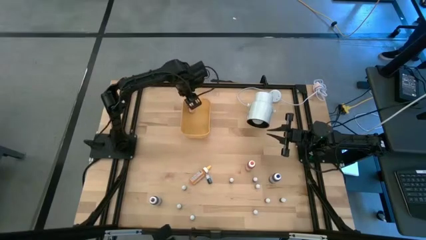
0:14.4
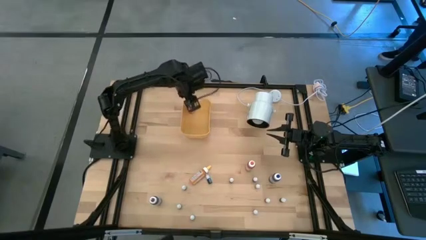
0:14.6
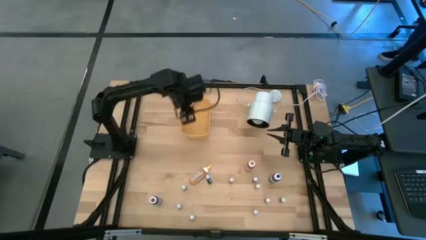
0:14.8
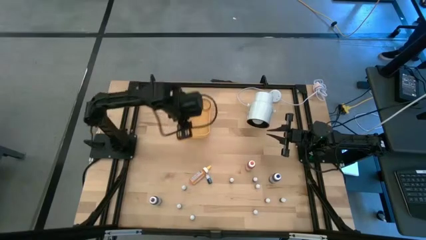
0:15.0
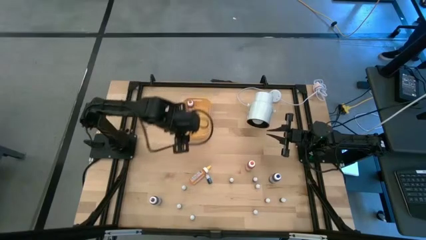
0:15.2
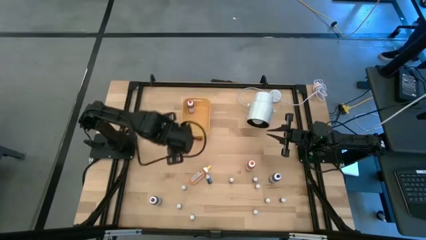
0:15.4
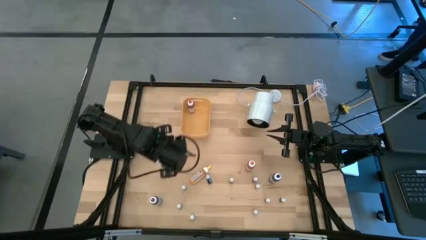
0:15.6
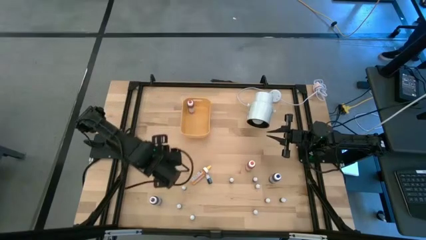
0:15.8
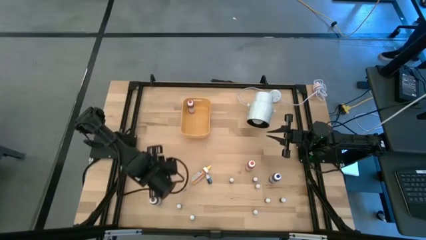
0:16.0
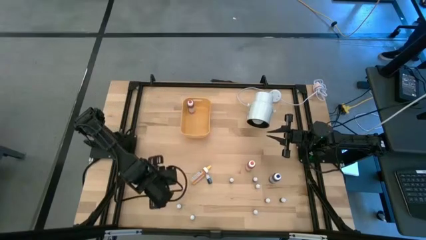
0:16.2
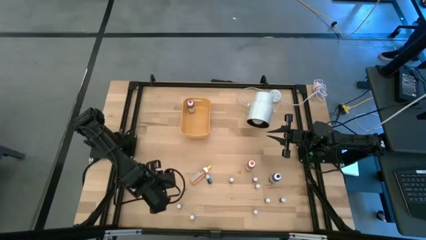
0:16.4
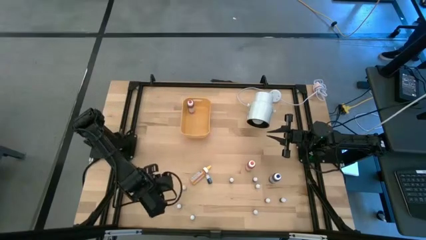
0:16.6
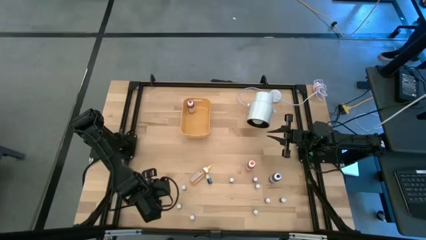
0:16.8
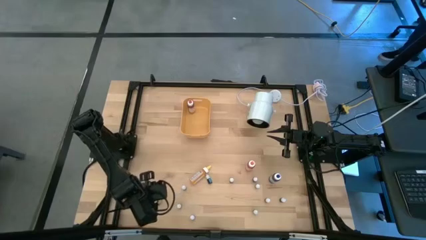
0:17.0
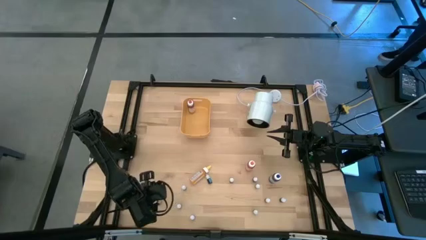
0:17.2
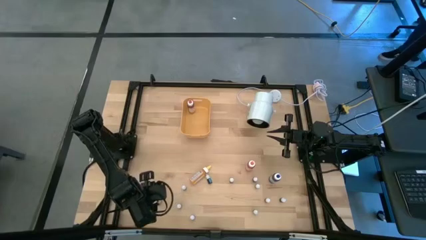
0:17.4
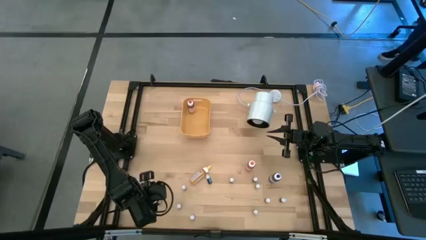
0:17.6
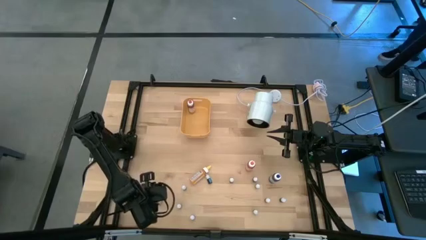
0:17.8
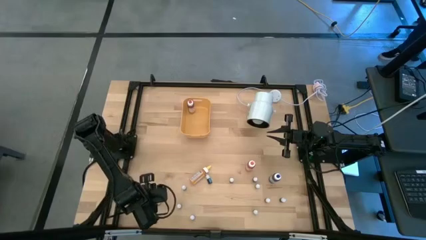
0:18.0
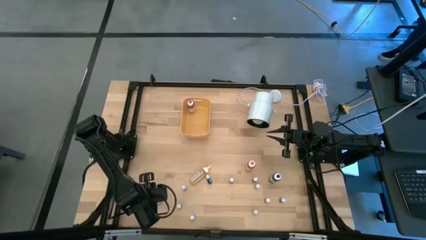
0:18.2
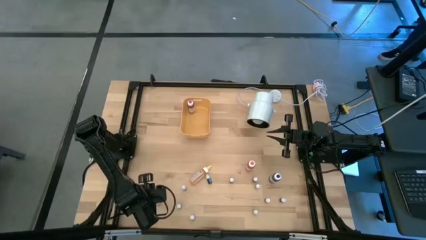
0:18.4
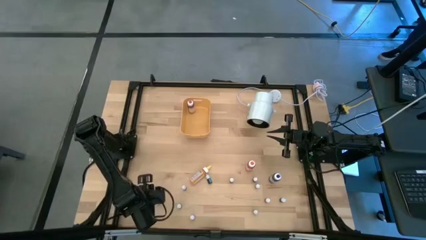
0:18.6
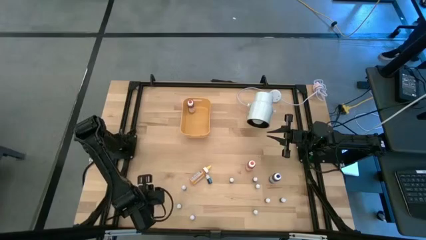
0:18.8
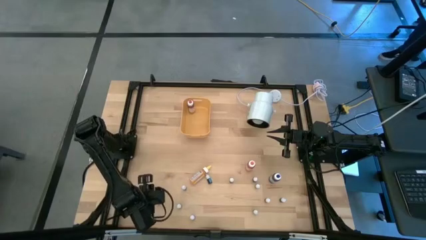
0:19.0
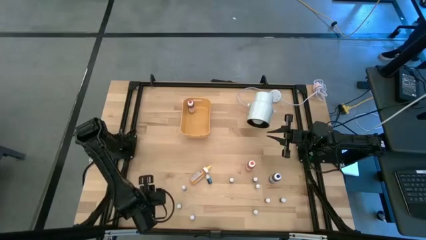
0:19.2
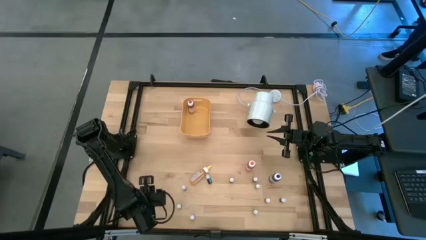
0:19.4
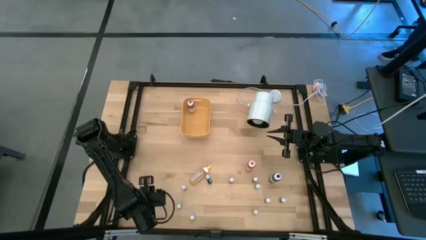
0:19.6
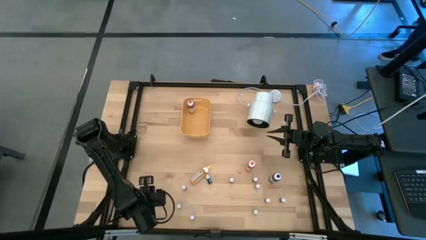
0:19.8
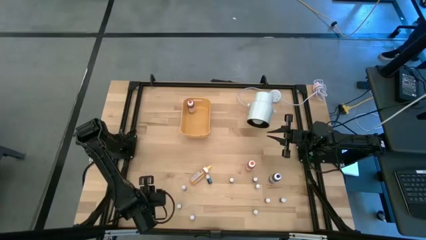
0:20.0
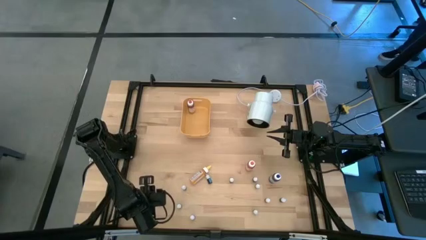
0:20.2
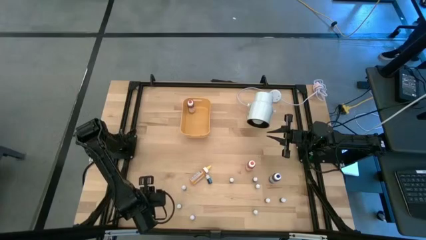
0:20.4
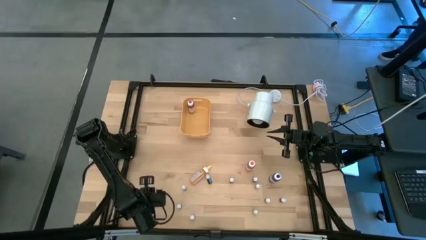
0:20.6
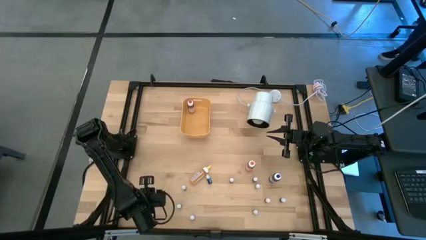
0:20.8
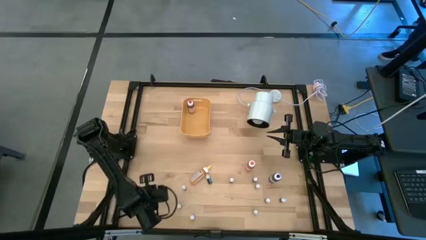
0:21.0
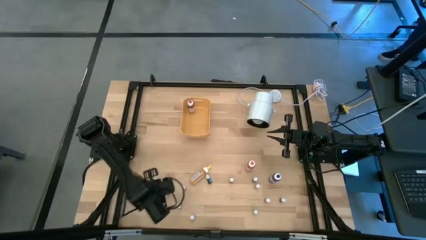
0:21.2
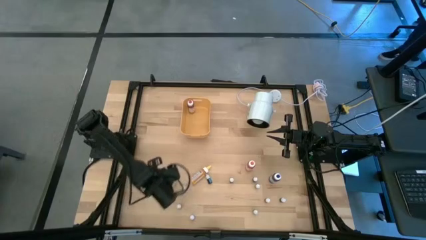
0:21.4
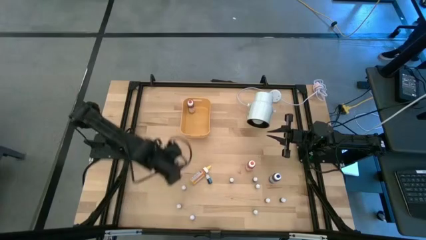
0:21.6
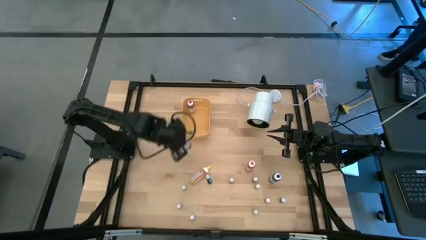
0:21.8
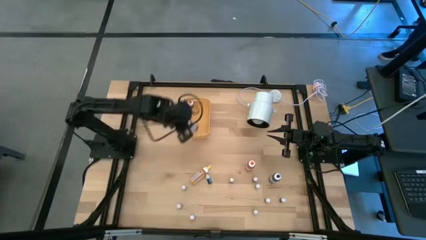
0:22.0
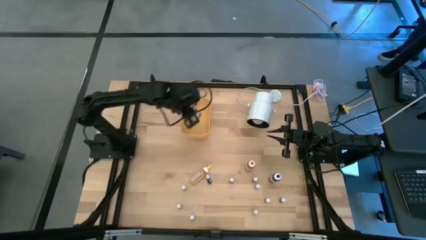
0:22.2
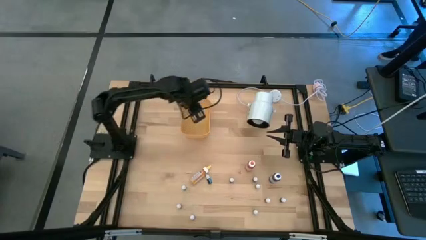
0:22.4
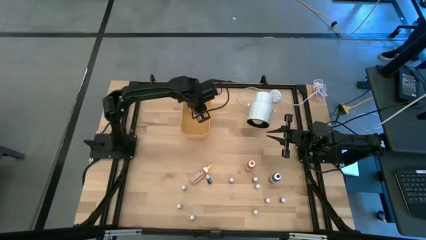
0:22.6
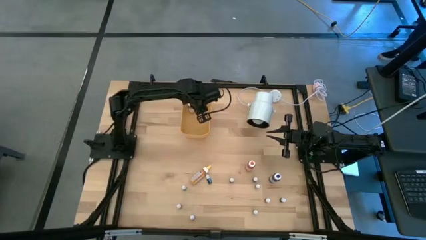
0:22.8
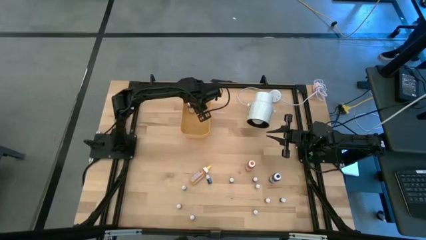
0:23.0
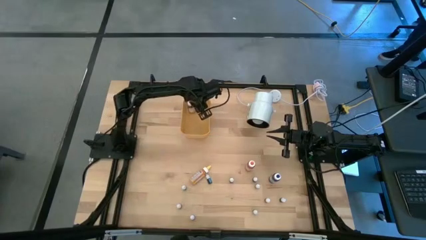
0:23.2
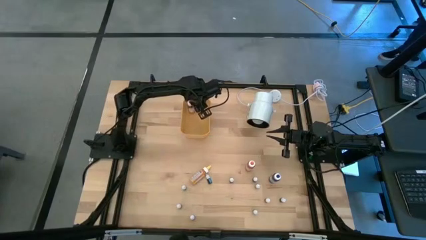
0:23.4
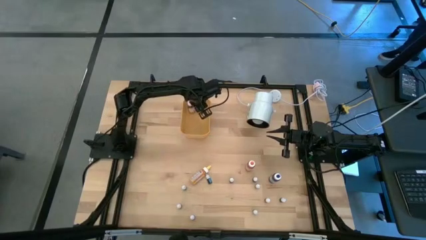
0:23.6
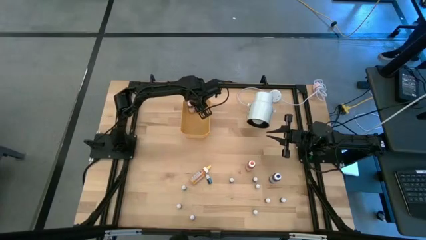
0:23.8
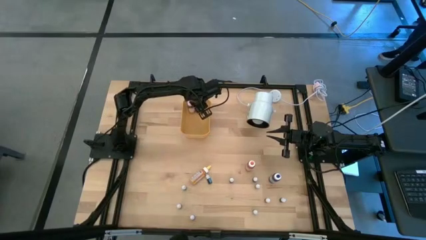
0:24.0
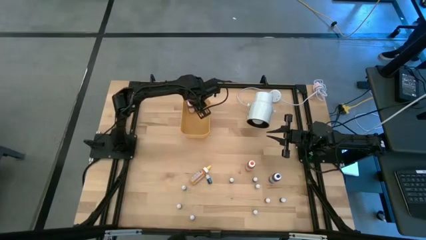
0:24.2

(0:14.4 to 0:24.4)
Task: Pick & Place food coloring
Put the large purple food coloring bottle into the yellow bin

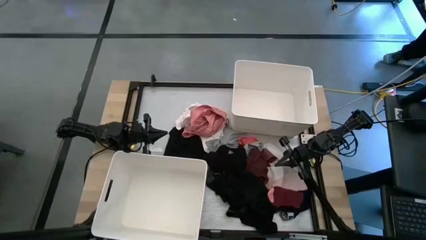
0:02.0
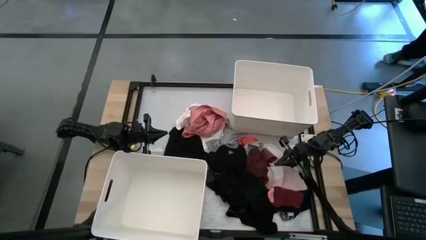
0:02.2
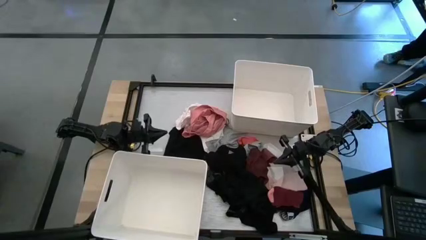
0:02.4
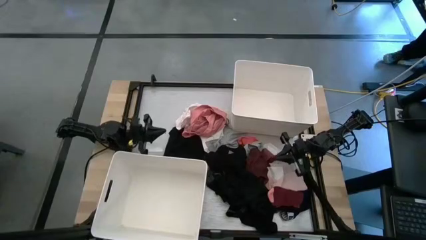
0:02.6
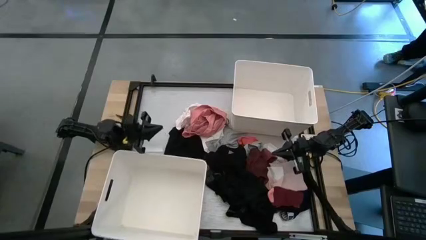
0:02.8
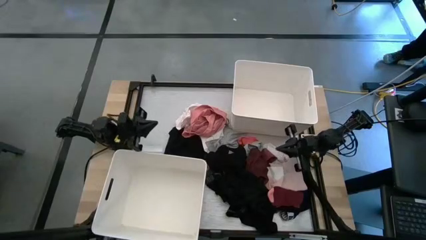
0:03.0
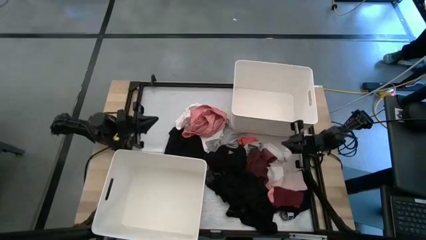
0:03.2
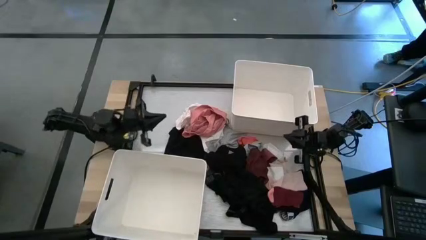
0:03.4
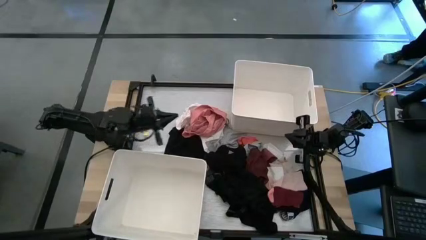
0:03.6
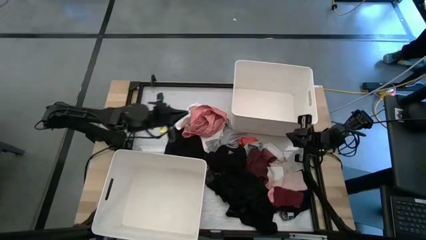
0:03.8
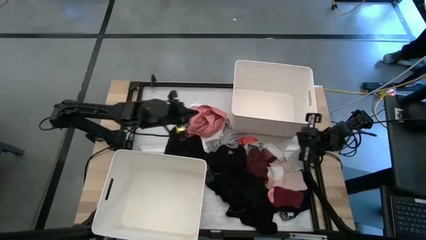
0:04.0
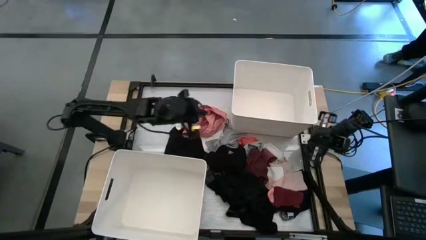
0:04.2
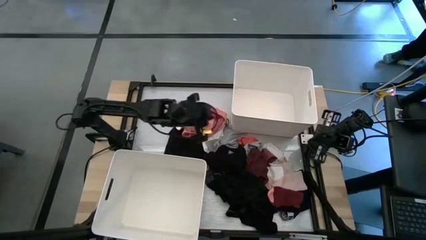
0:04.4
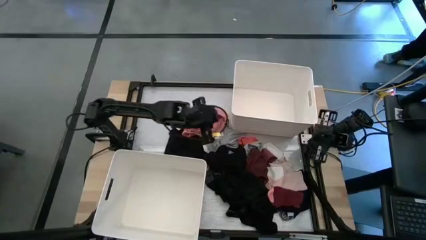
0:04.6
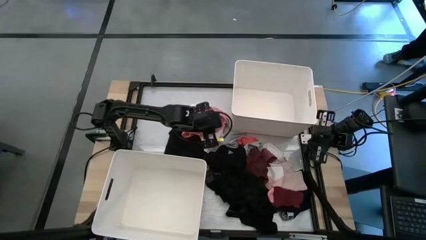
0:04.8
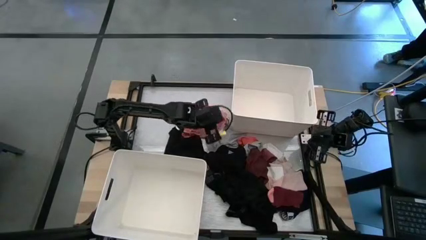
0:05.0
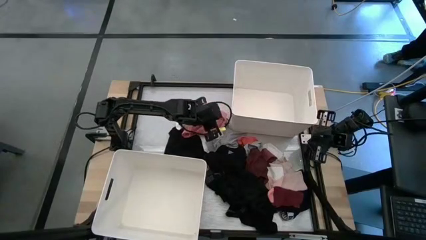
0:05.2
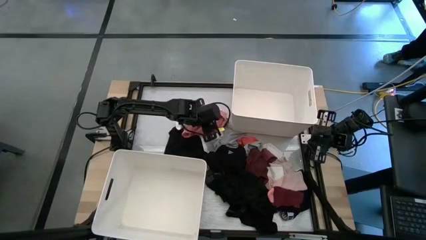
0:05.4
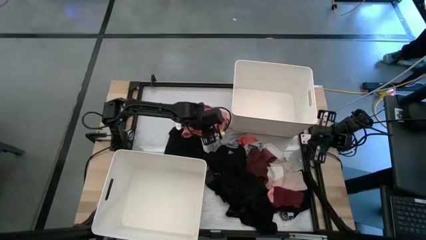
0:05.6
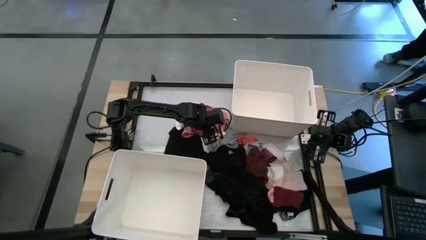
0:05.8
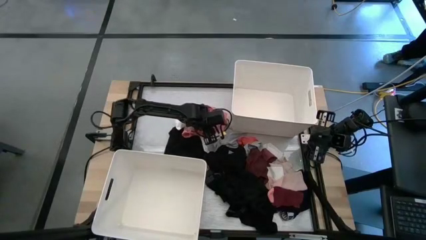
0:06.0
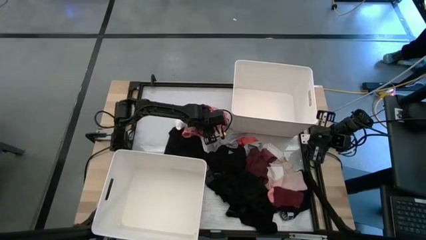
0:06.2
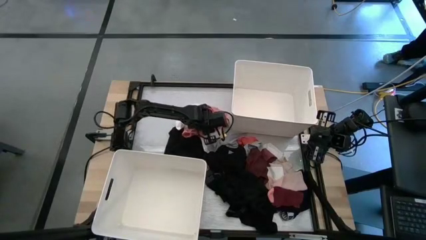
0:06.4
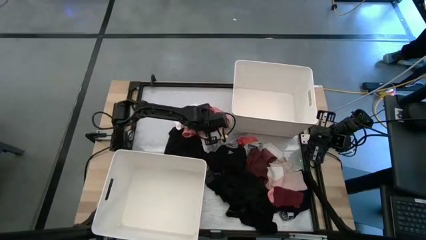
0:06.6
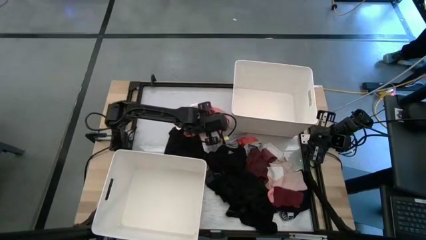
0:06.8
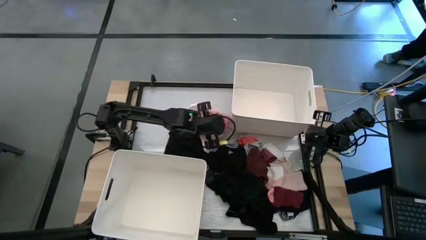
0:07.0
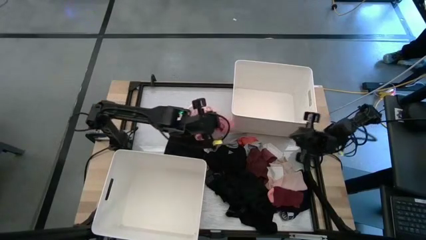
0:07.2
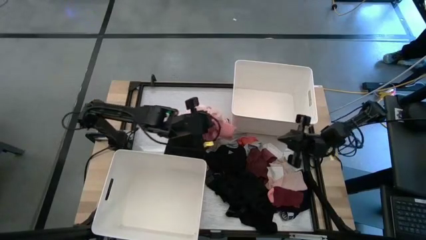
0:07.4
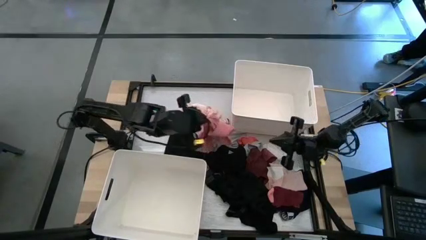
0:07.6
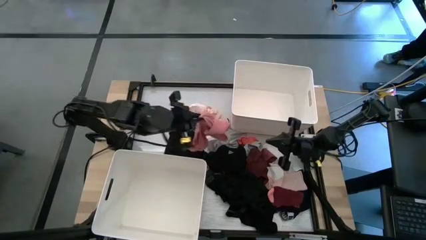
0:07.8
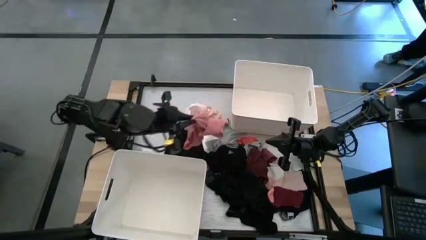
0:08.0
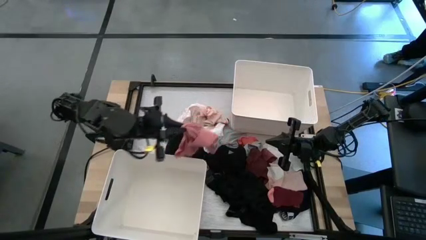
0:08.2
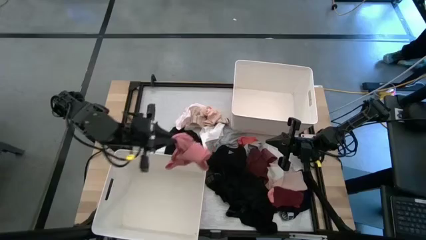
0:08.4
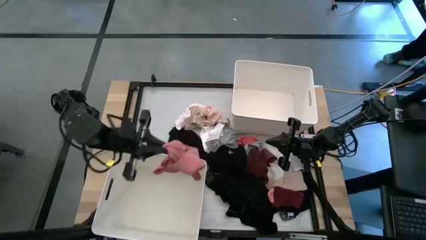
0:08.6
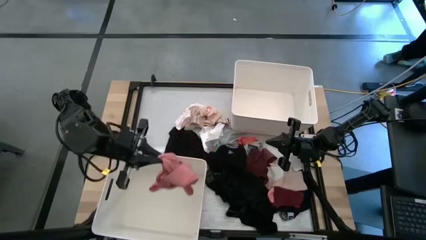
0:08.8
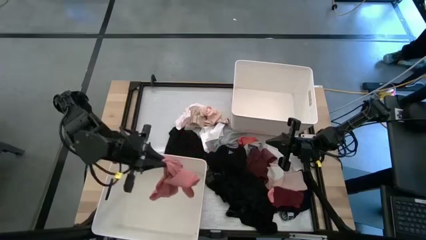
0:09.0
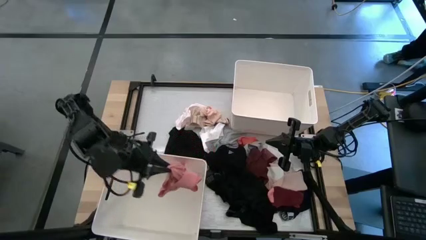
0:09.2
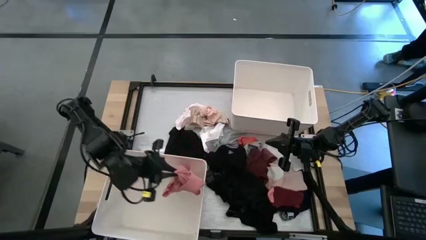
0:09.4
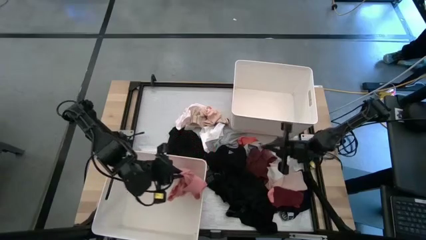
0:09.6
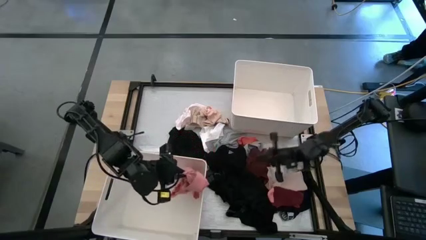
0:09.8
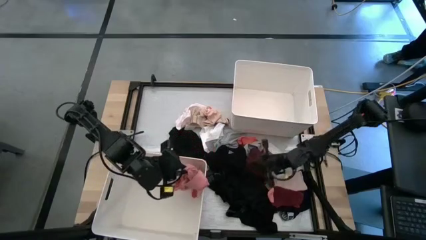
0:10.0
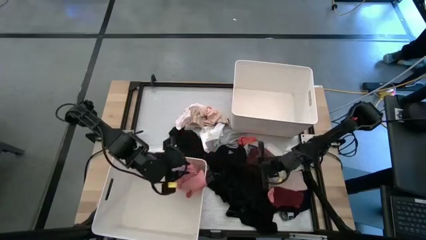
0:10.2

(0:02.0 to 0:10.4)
Task: Sort clothes
Put the pink underwear into the bottom white bin
